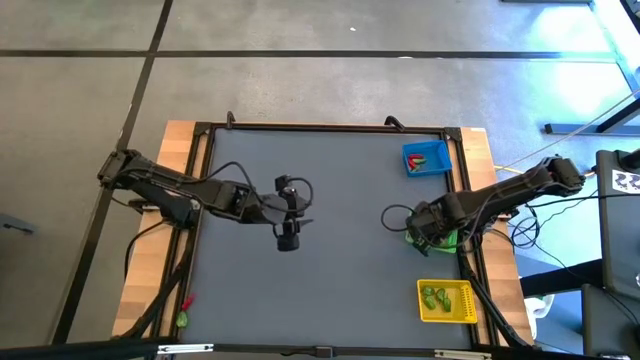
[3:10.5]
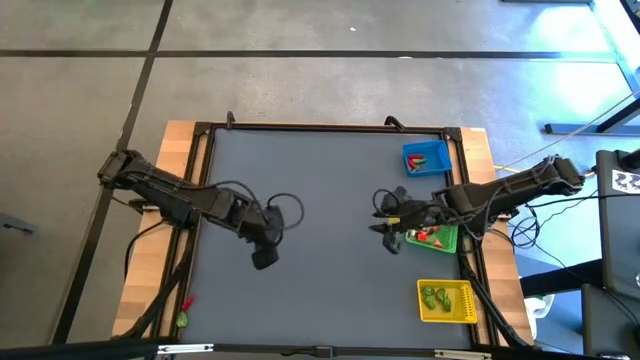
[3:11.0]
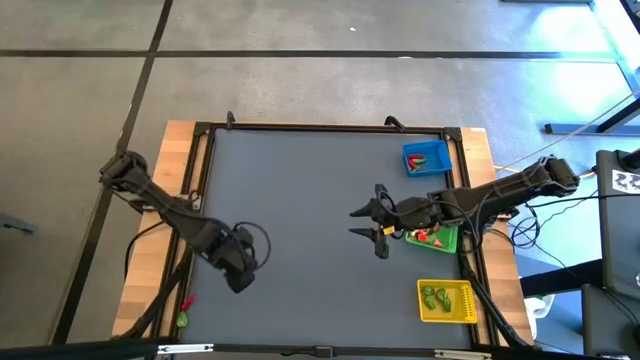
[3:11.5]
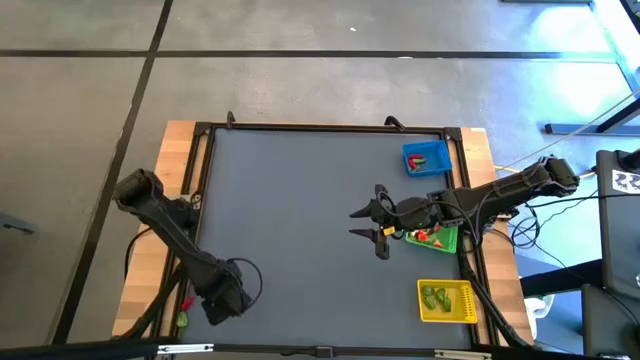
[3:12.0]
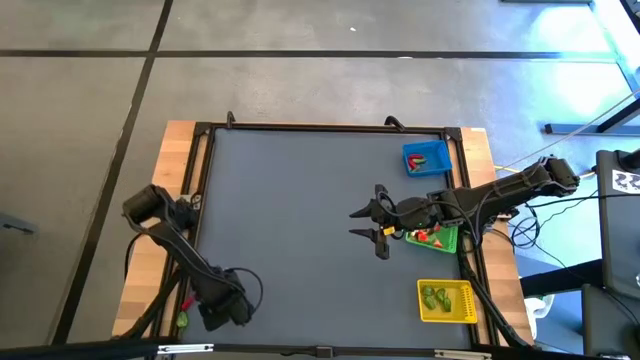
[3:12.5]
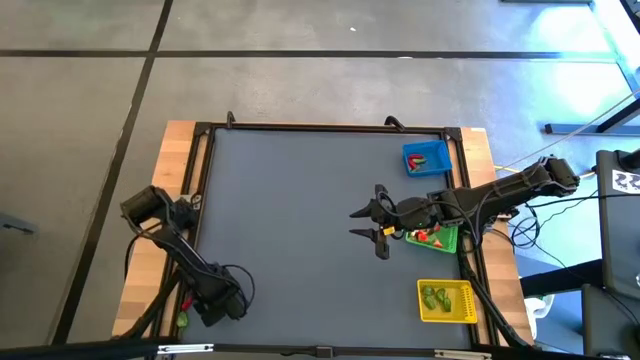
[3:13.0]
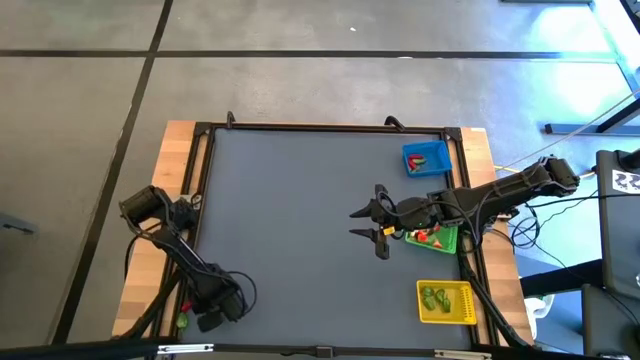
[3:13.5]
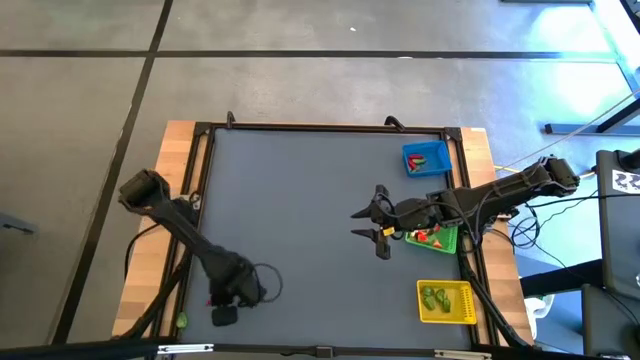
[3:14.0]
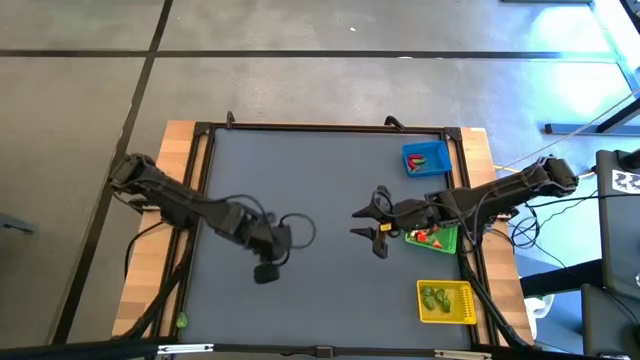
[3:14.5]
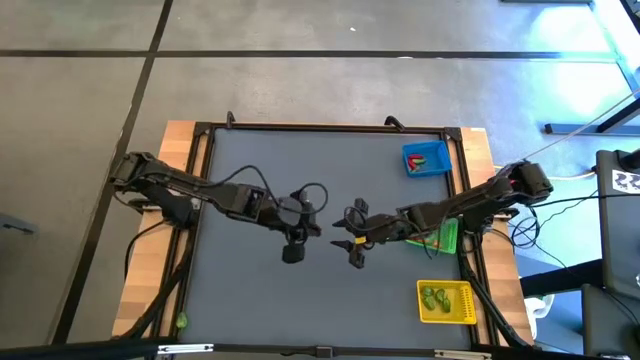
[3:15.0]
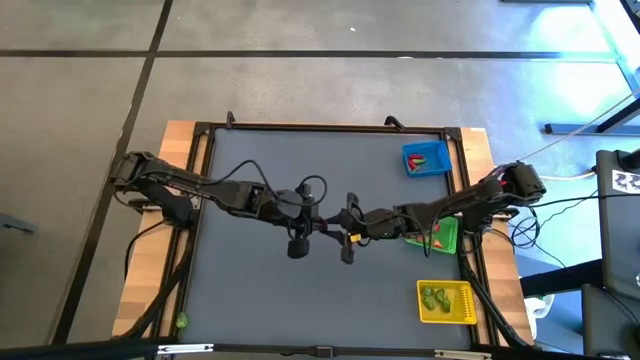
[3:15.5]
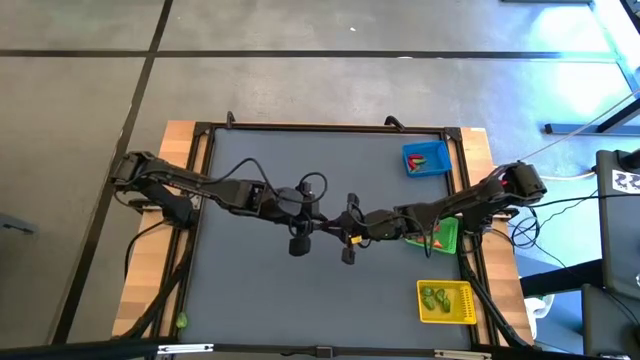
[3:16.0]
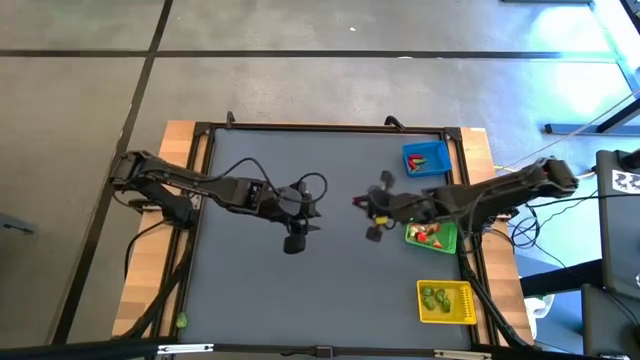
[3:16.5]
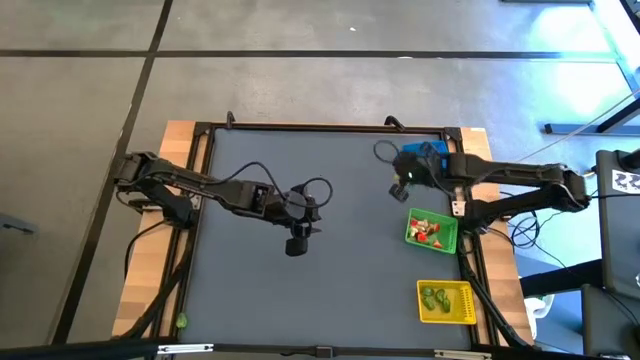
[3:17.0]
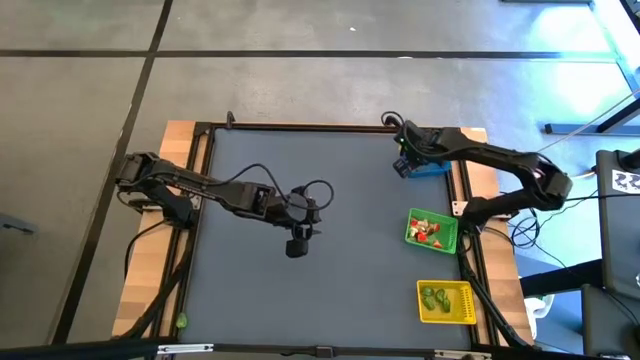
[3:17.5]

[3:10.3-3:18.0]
Task: Sort produce into baskets
Put the red chili pepper into the blue basket

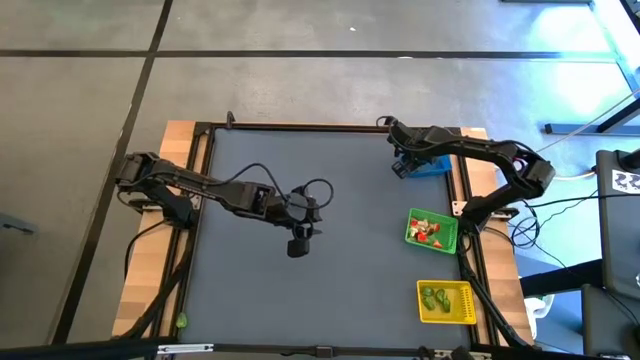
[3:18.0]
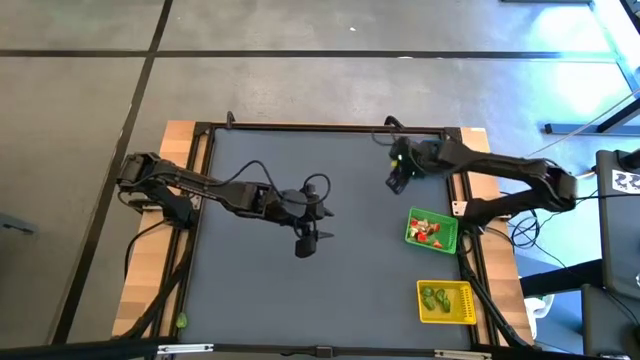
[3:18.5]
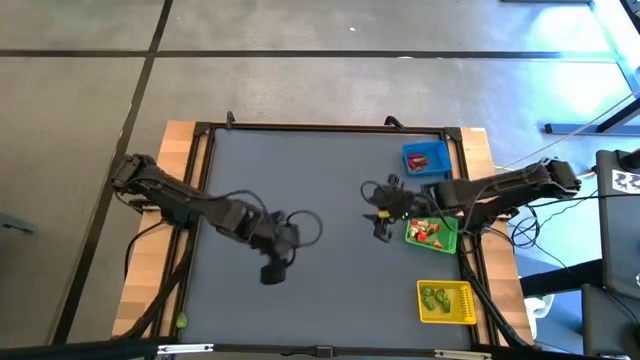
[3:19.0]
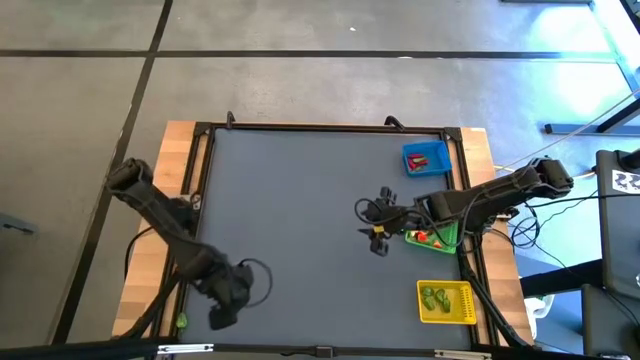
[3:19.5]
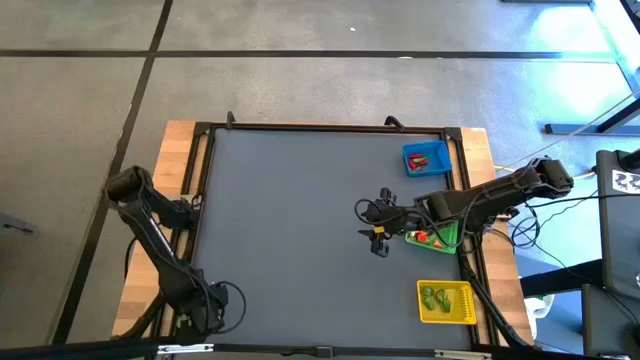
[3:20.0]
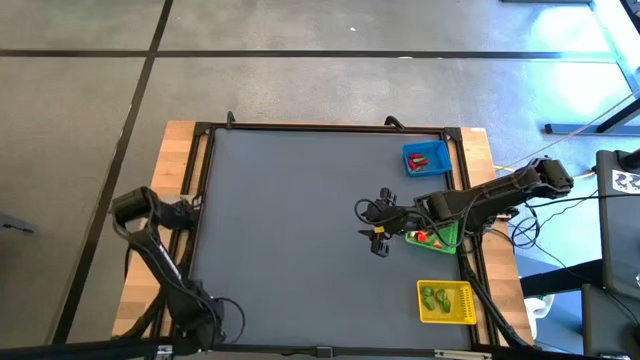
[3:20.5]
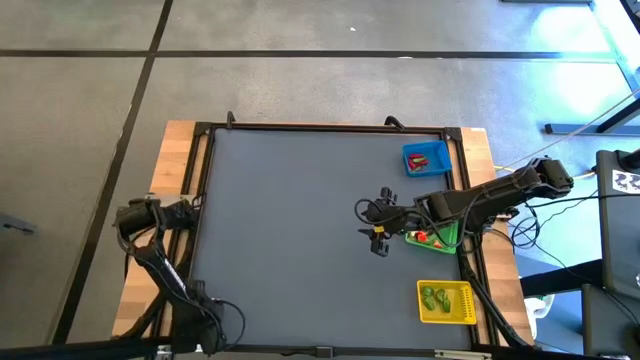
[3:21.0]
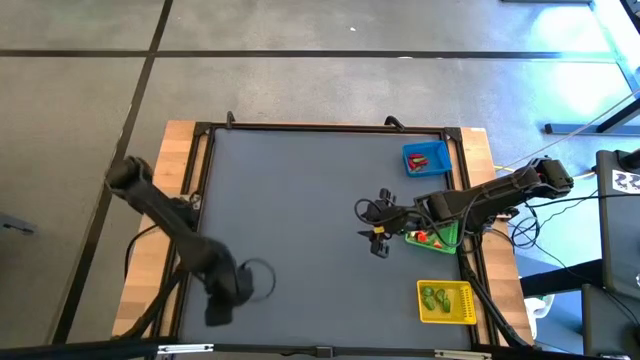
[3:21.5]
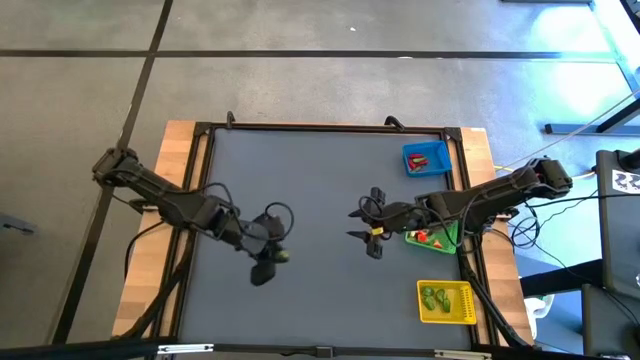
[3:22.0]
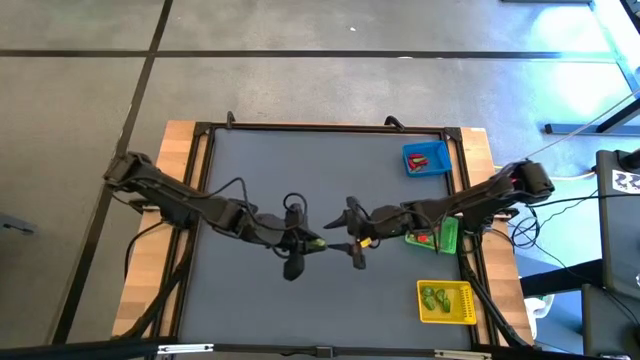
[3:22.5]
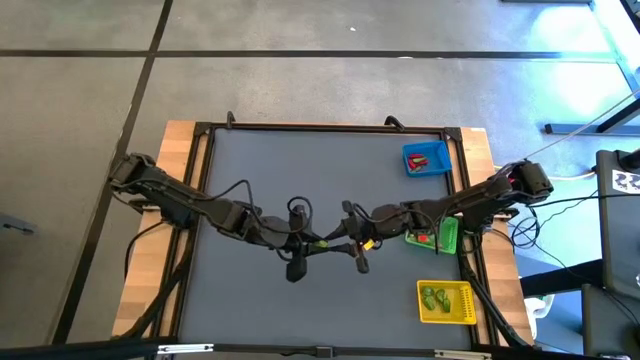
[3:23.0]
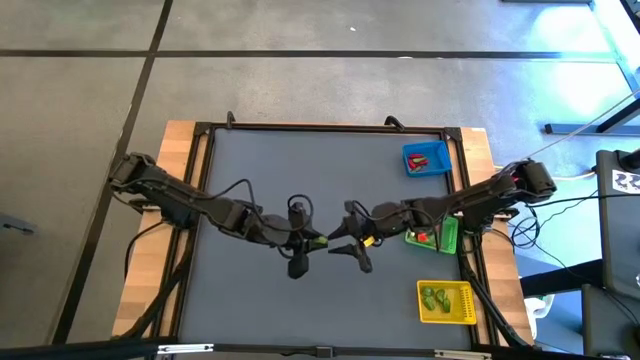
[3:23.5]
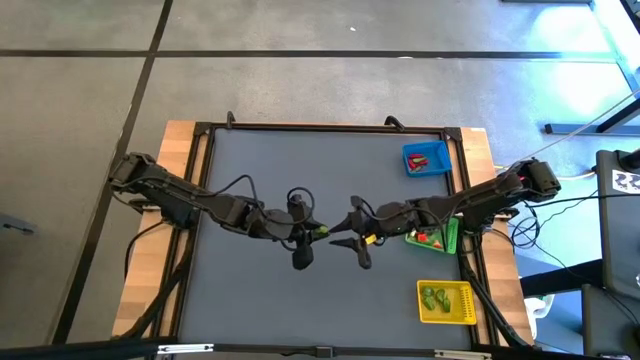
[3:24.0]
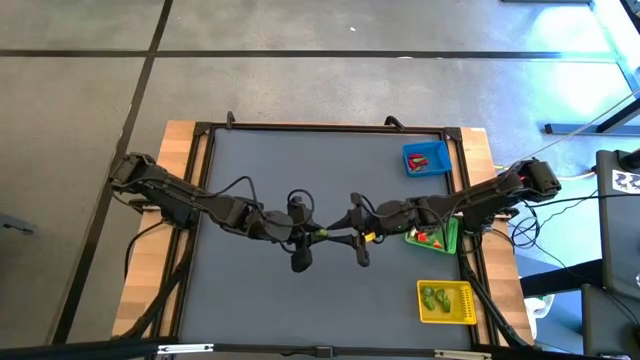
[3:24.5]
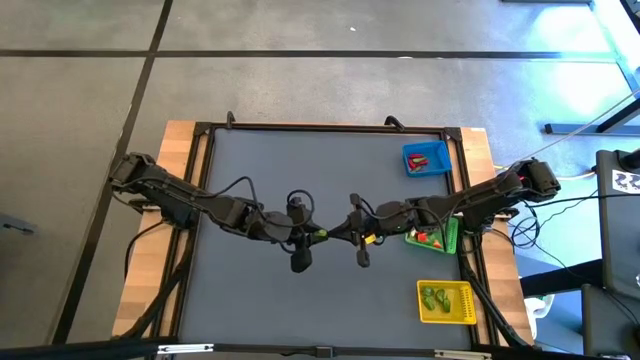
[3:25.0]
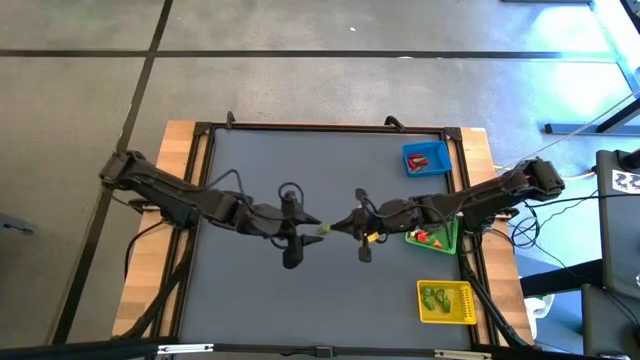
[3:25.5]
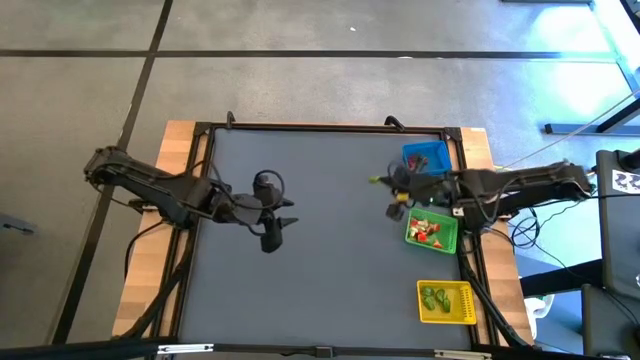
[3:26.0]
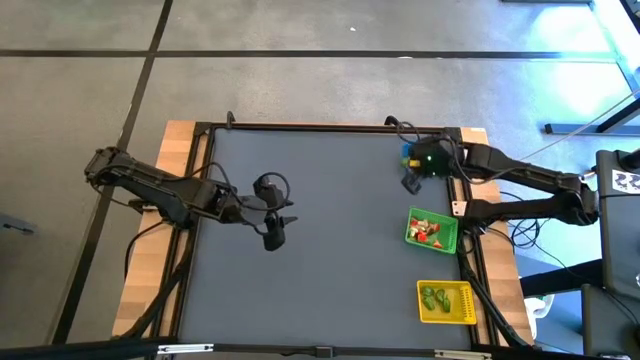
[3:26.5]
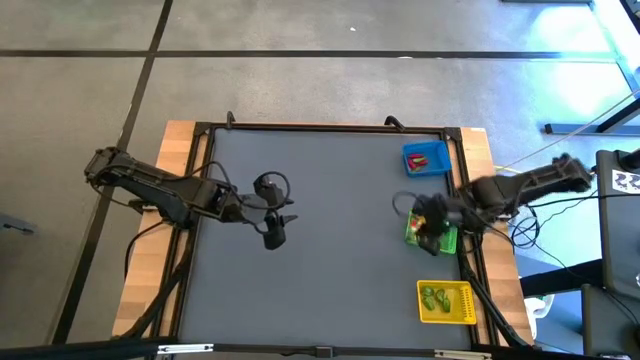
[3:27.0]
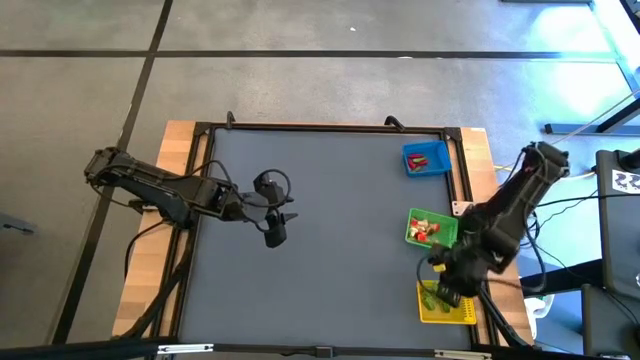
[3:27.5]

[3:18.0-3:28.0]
Put the capsicum into the yellow basket

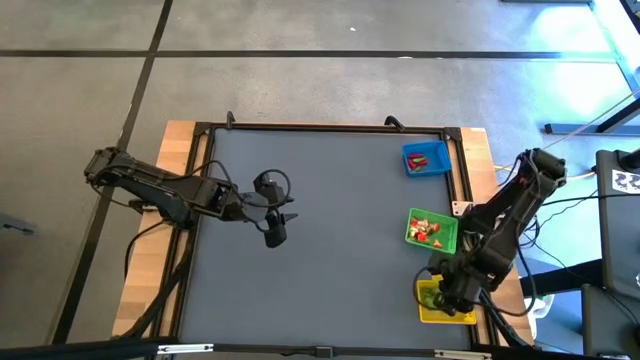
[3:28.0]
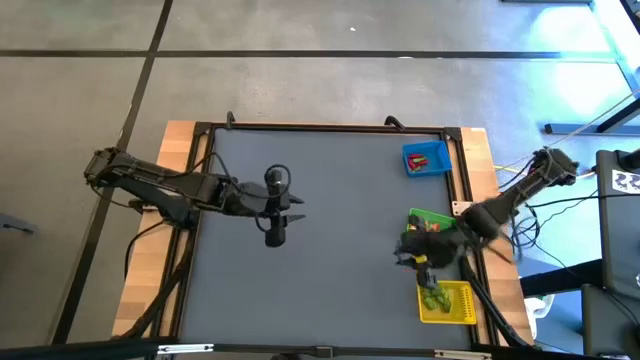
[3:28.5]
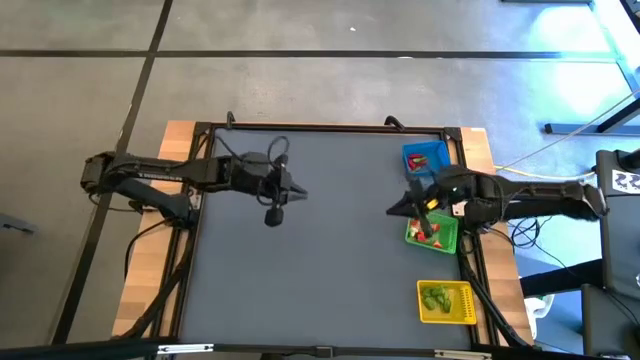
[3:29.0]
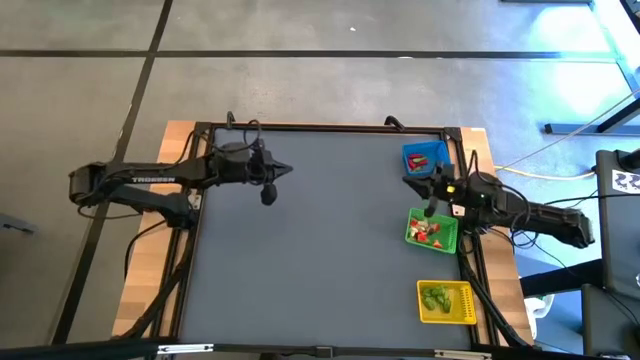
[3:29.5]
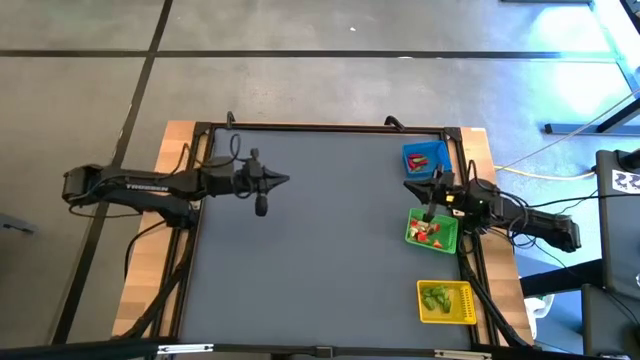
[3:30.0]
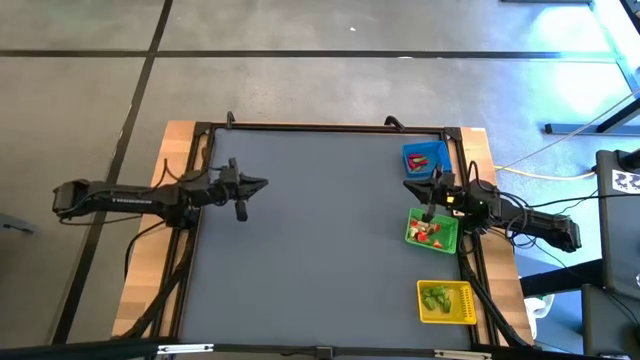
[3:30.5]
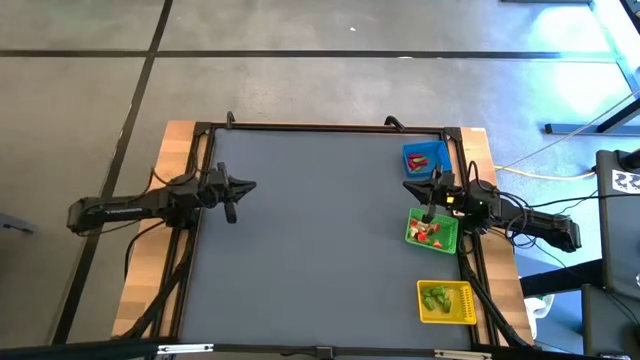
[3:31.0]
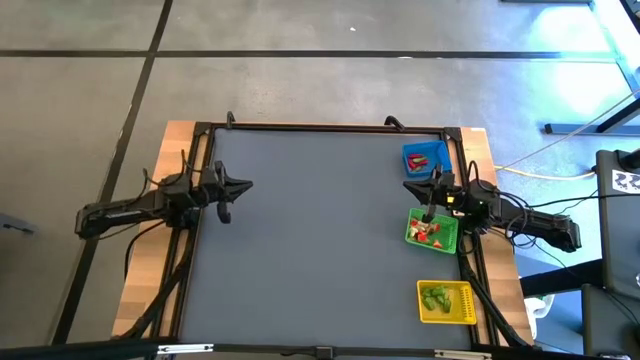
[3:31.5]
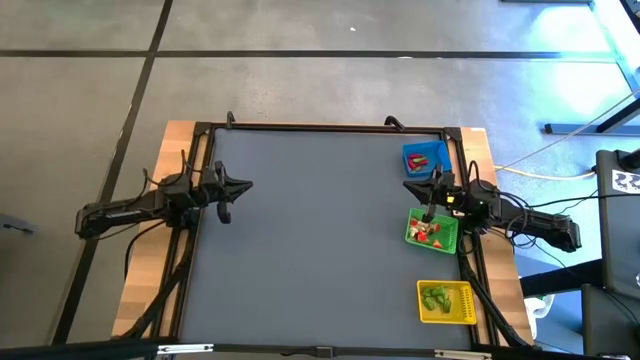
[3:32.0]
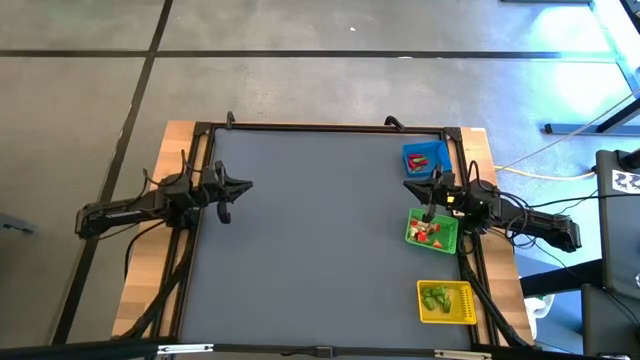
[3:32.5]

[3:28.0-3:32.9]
Return to Home Position
